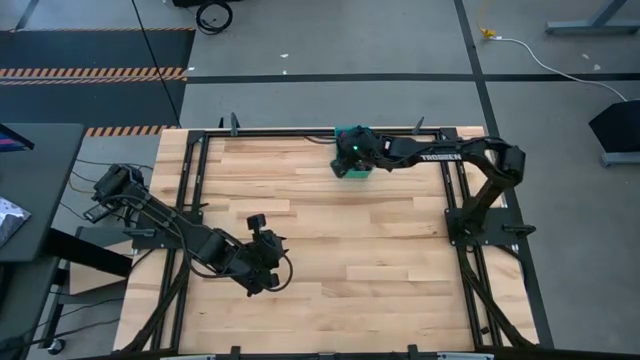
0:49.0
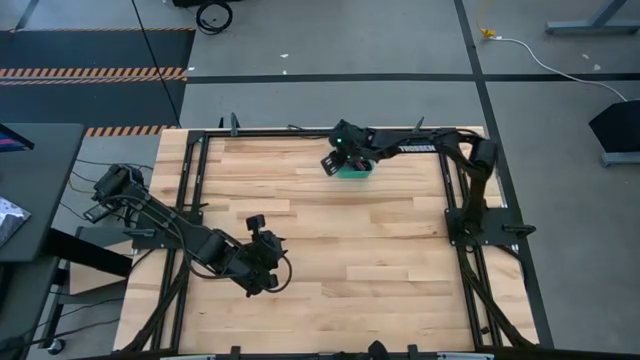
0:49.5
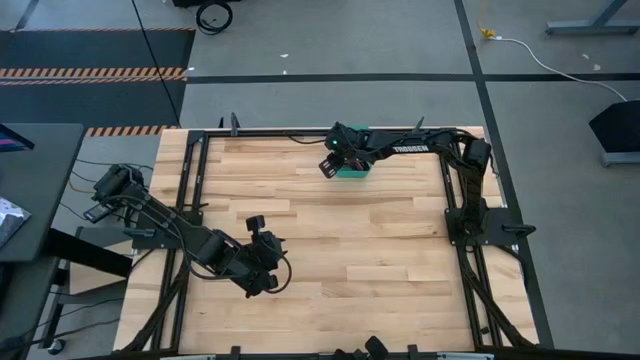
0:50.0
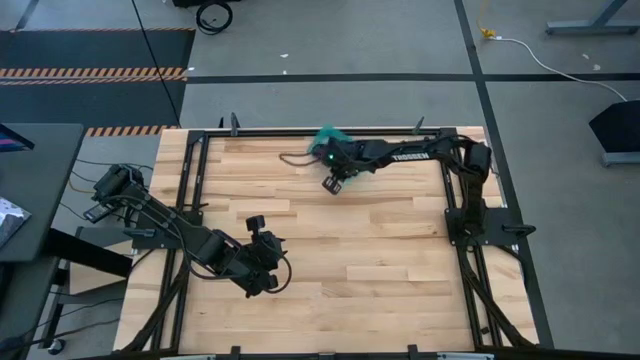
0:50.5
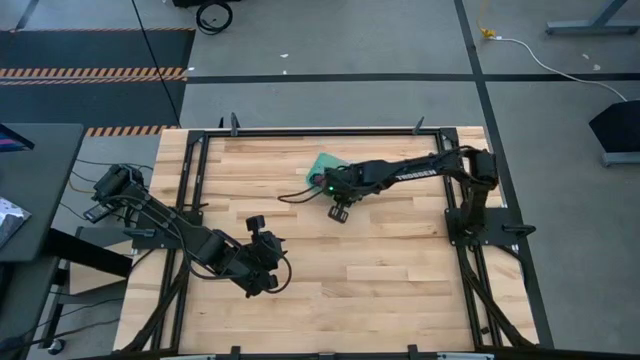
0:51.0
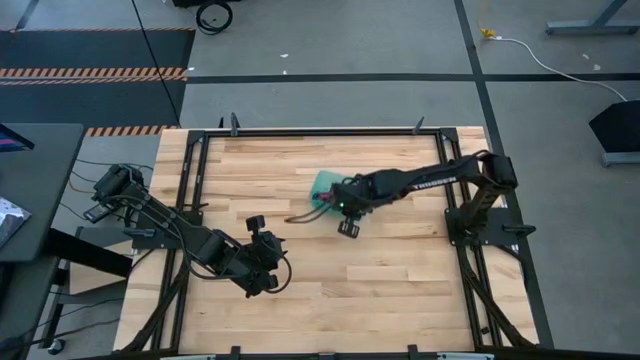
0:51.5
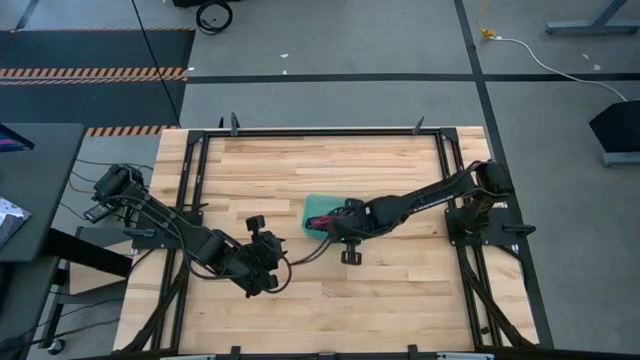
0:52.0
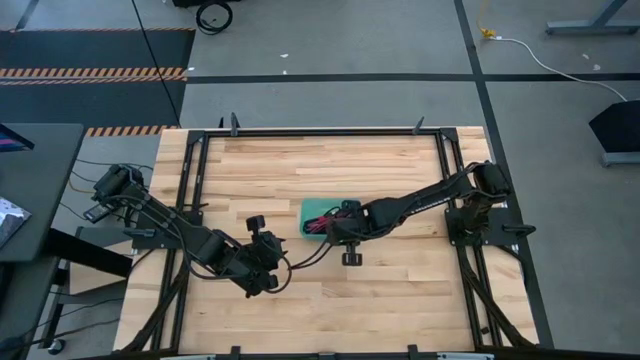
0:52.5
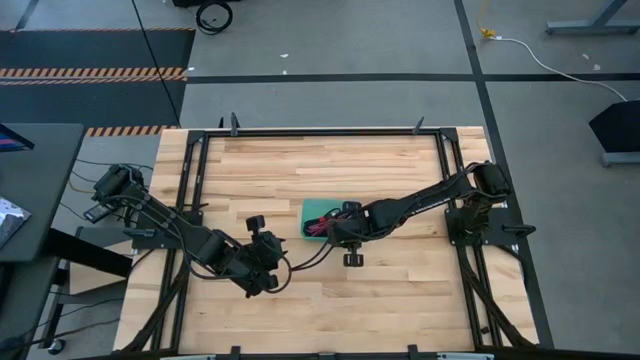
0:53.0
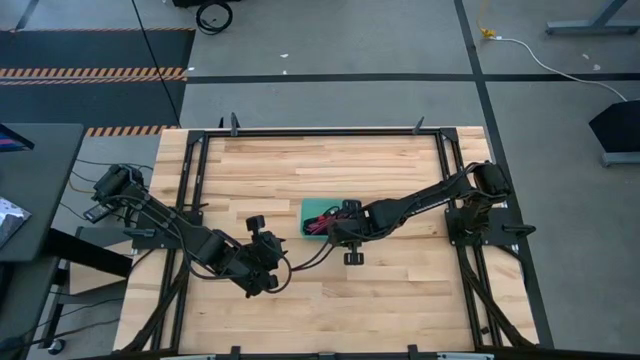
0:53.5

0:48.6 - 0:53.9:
Task: Pick and place USB-C Cables
Move the green bin to the center of the table

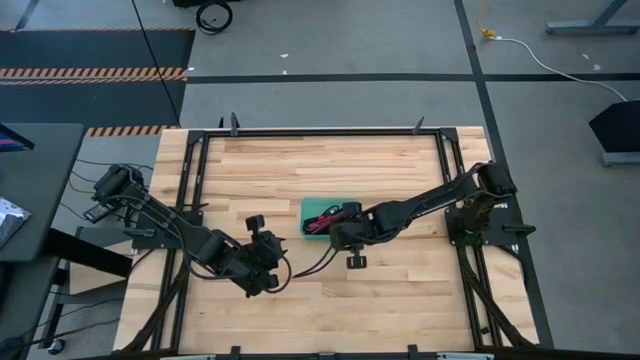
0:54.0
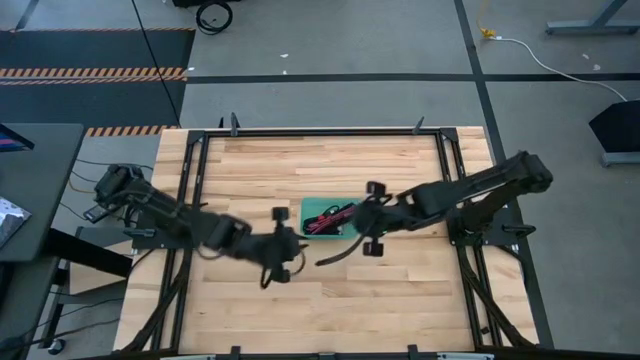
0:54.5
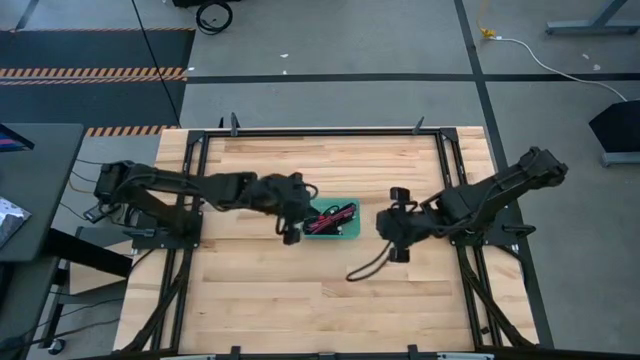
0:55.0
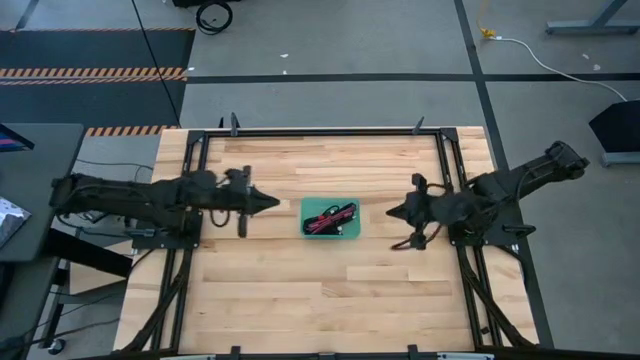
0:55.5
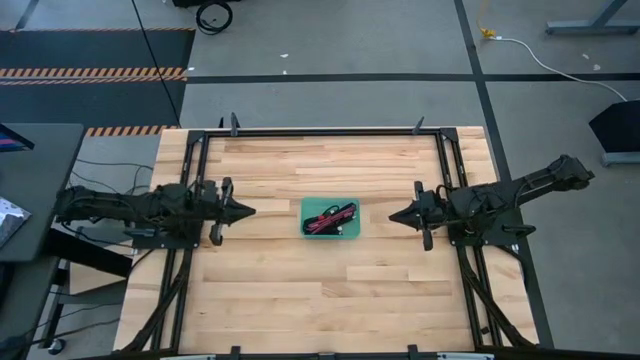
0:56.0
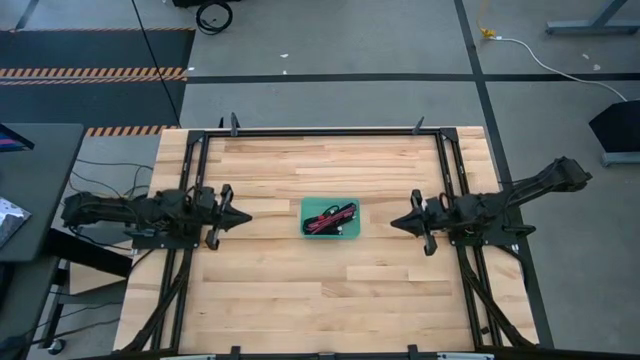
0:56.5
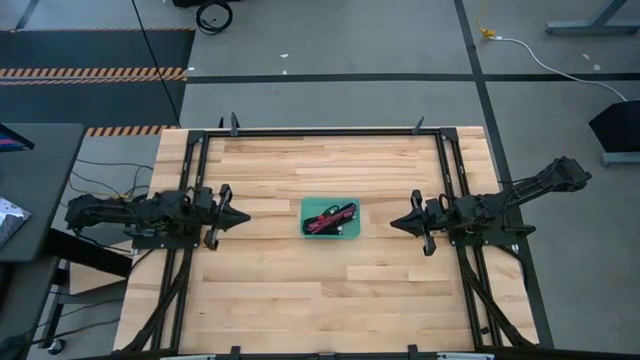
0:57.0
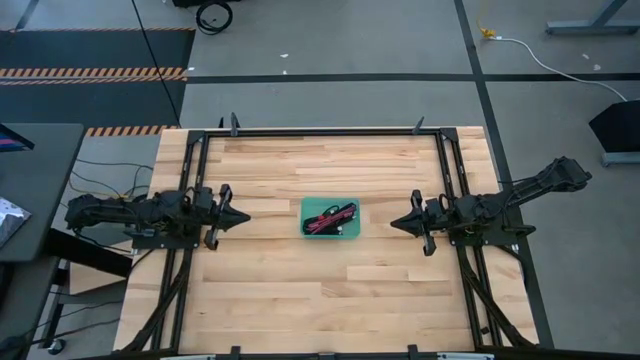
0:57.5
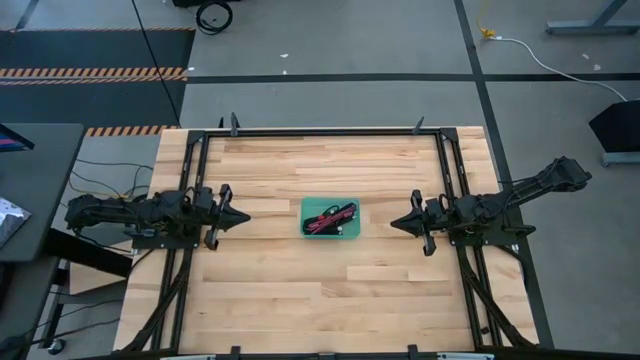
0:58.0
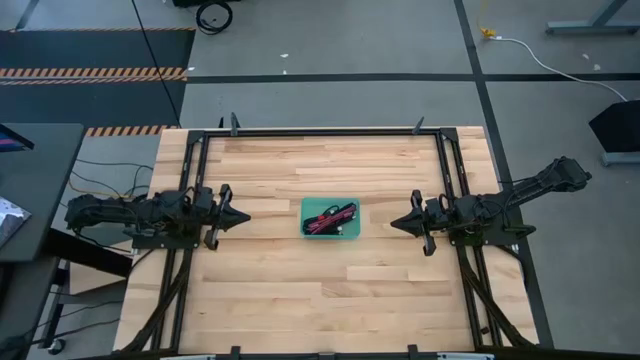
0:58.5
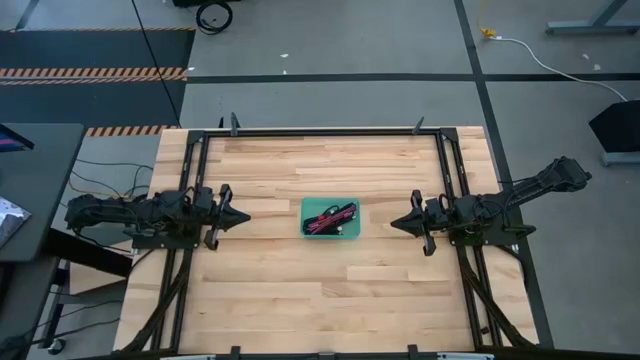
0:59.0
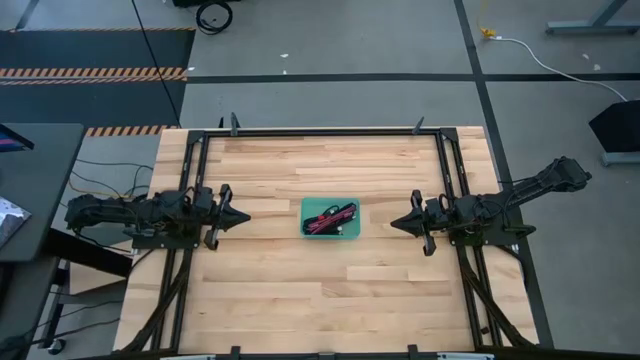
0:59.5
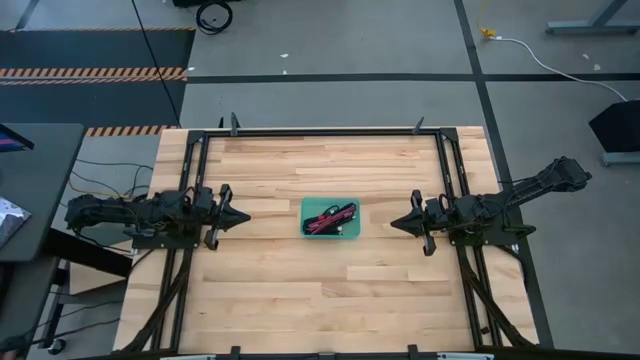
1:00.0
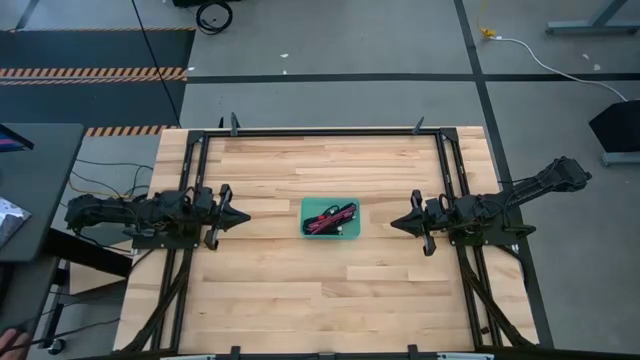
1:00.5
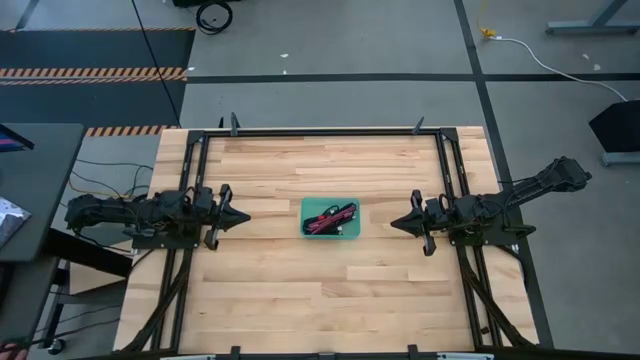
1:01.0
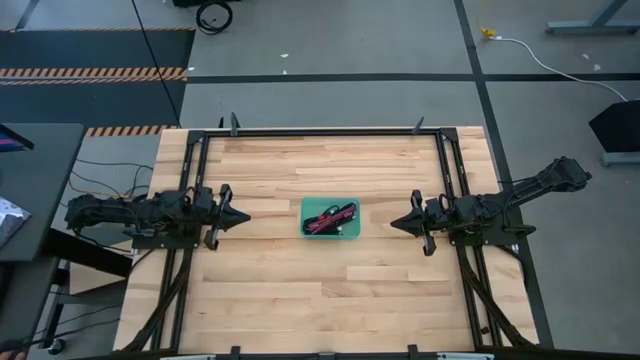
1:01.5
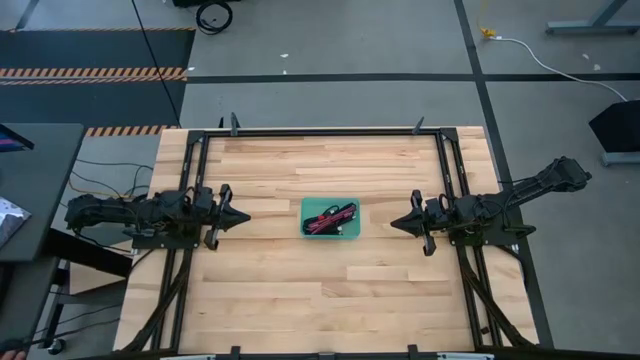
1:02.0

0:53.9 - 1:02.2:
Return to Home Position

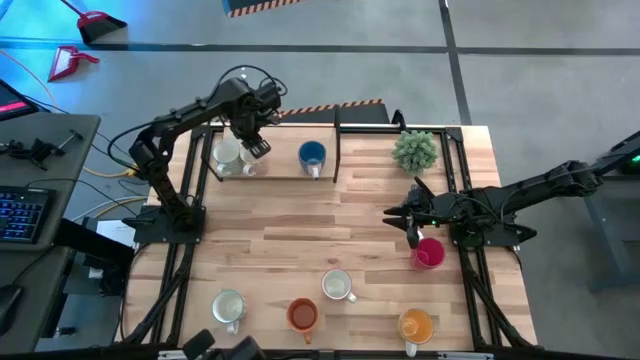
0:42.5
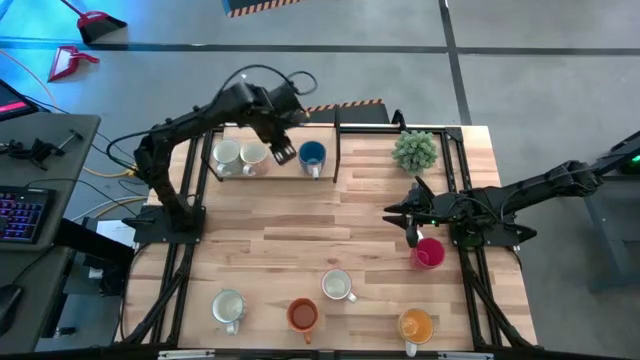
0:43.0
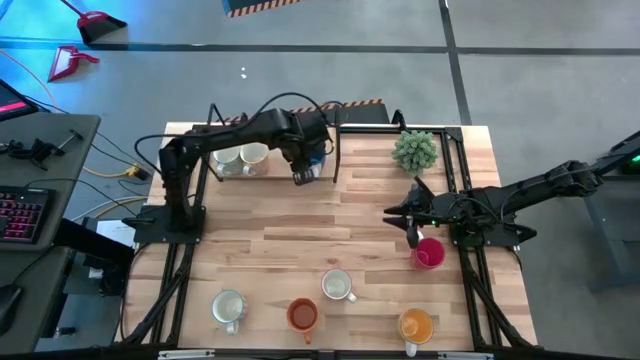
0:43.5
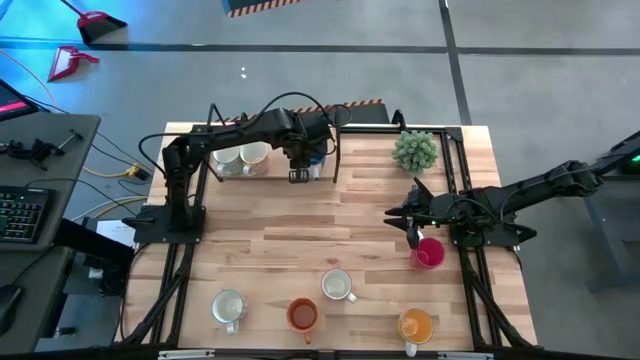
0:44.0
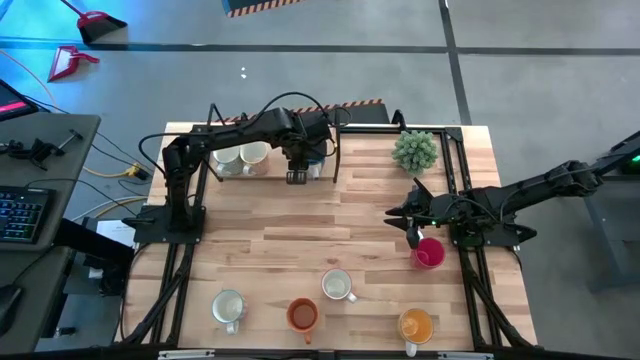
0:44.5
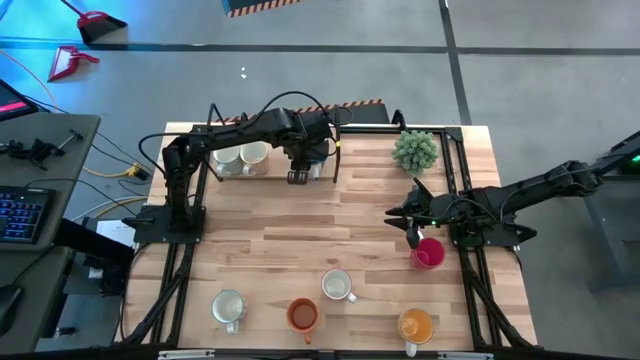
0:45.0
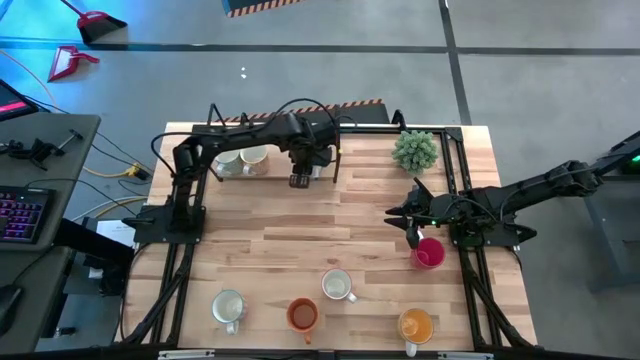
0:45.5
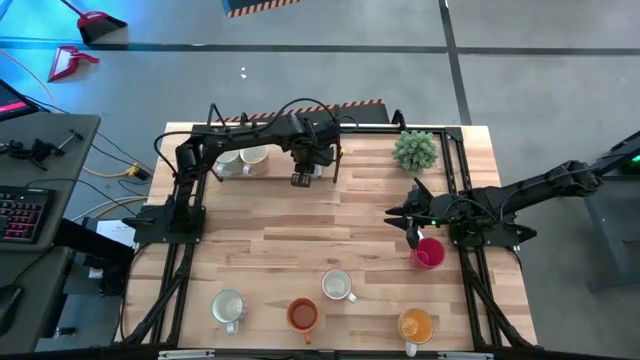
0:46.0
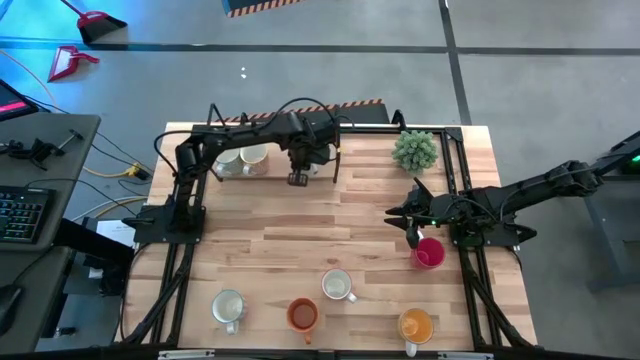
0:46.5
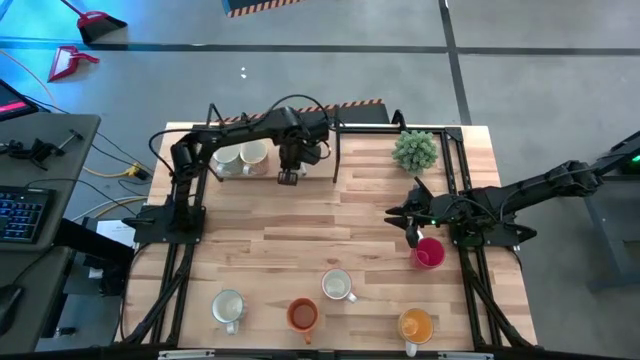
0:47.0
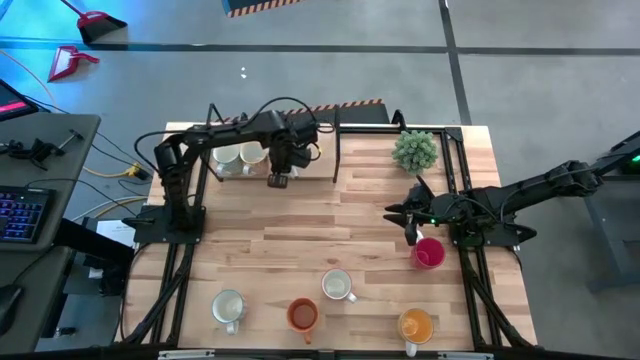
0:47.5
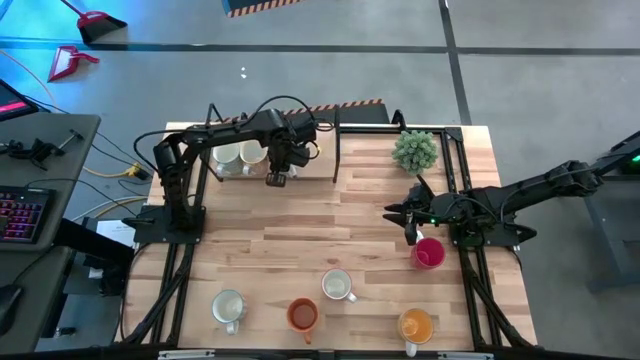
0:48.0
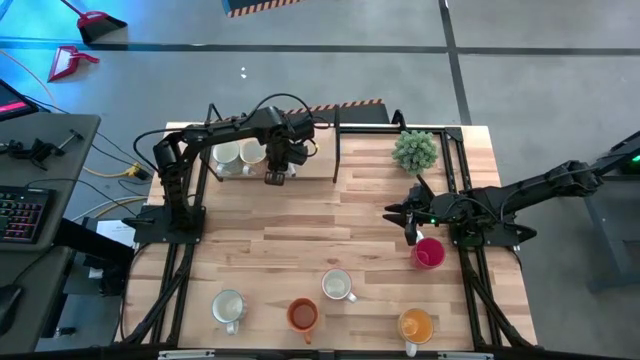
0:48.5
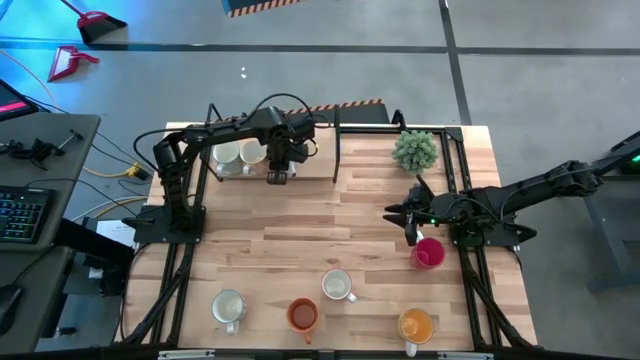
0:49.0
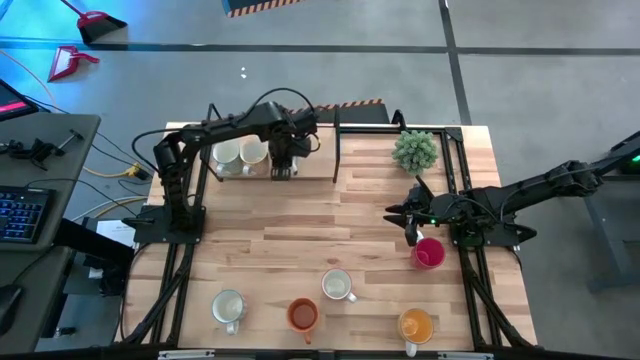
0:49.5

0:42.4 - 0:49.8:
Task: Place coffee mugs
Adjust the blue mug on the shelf
